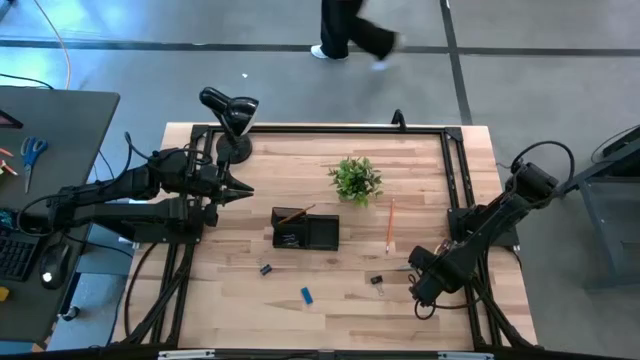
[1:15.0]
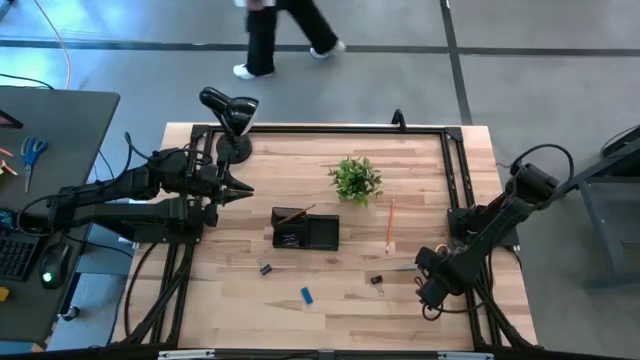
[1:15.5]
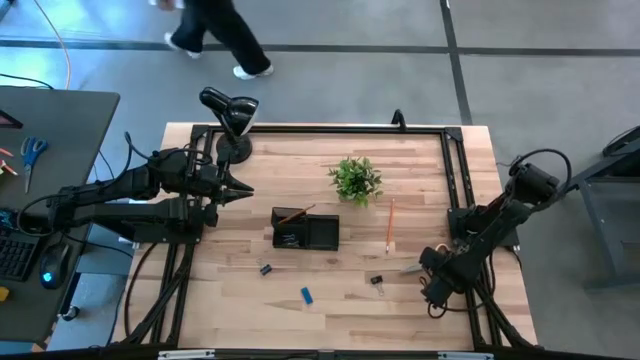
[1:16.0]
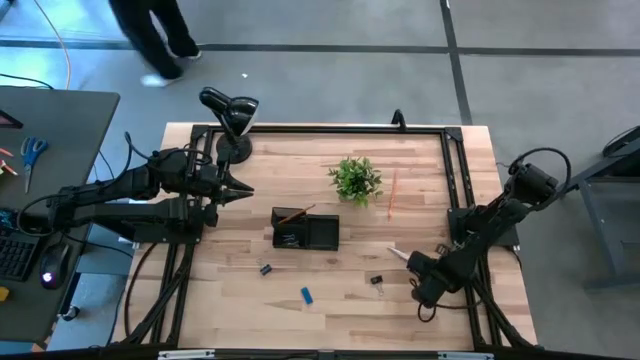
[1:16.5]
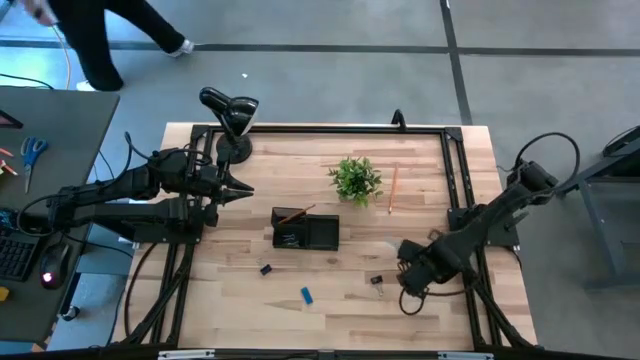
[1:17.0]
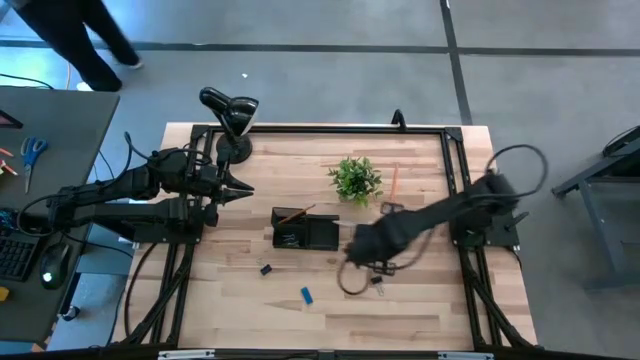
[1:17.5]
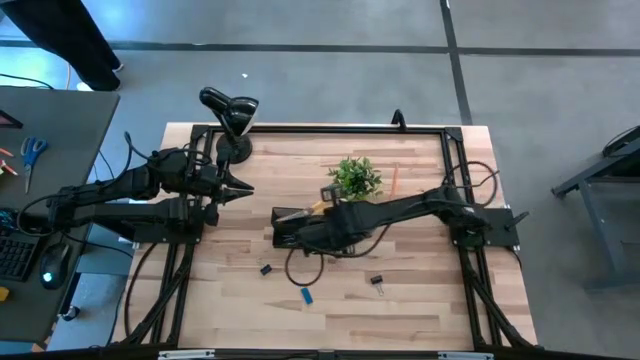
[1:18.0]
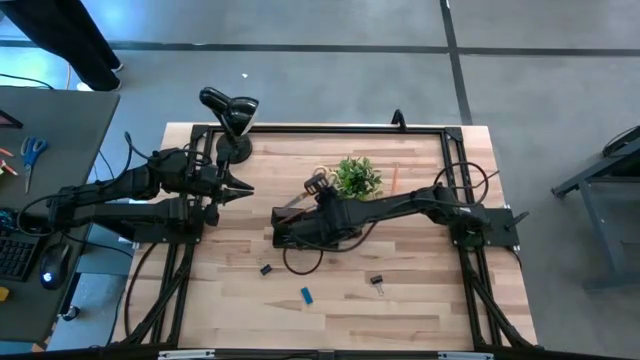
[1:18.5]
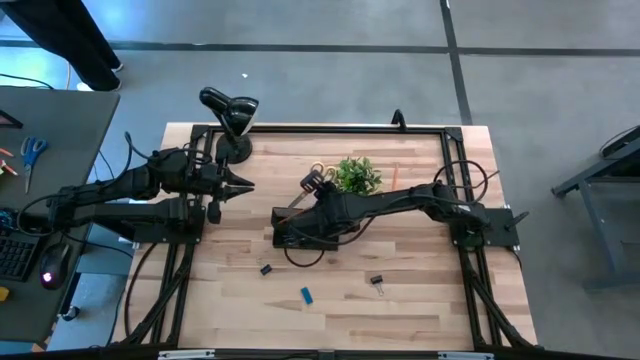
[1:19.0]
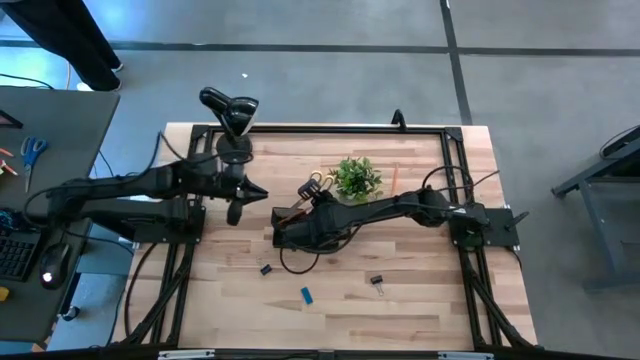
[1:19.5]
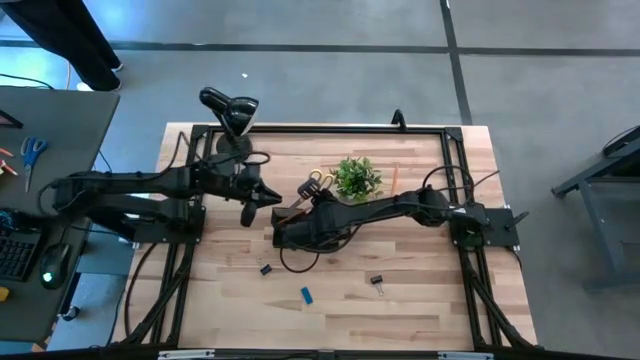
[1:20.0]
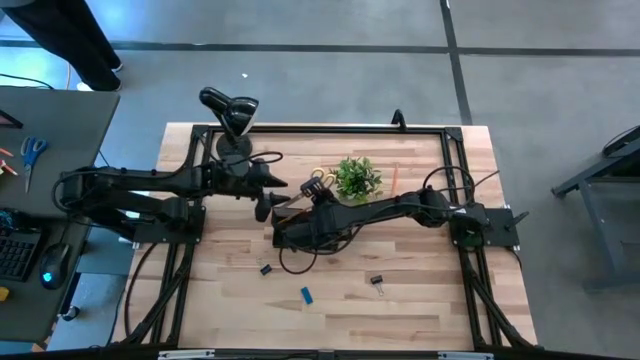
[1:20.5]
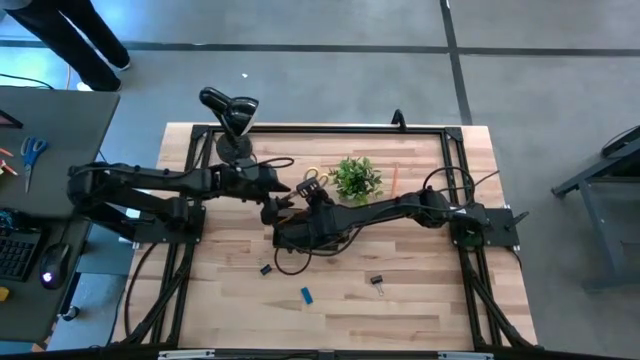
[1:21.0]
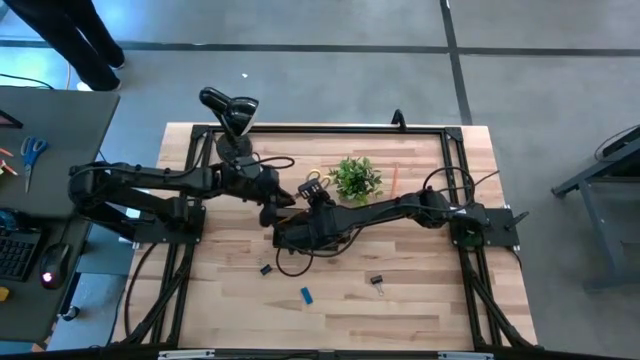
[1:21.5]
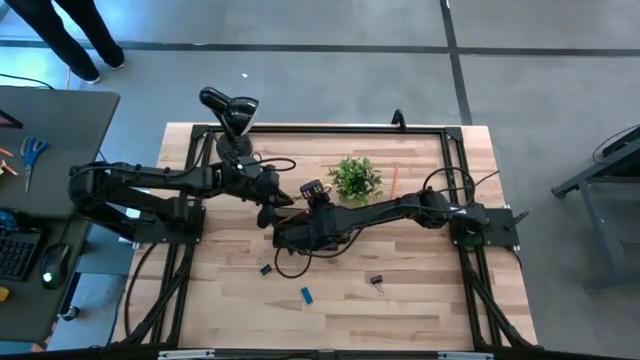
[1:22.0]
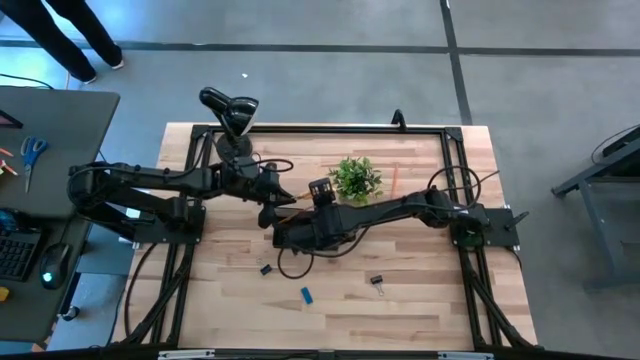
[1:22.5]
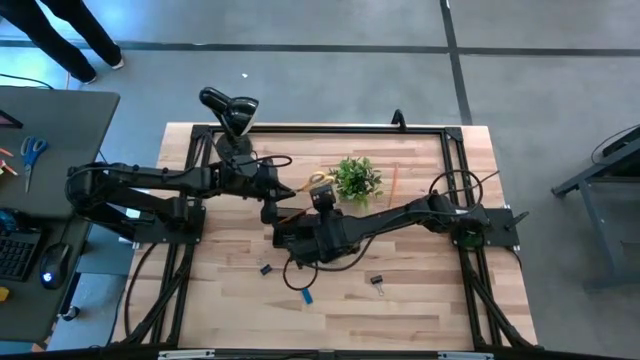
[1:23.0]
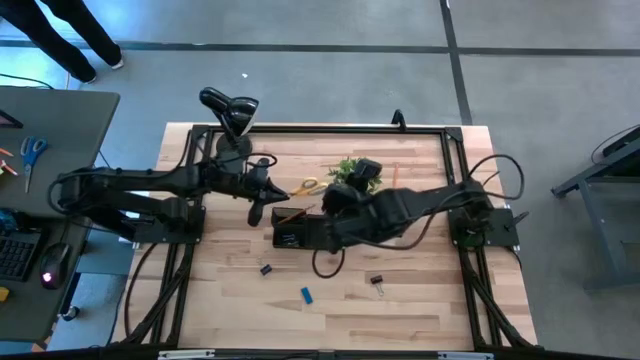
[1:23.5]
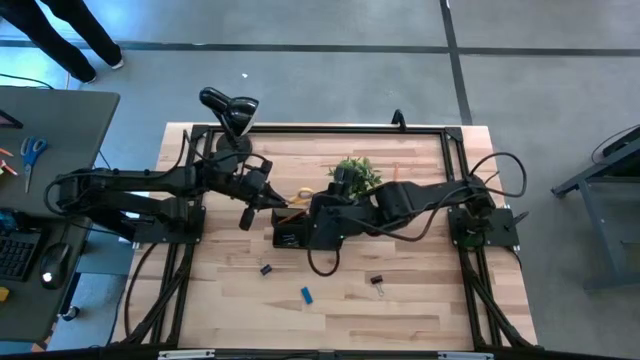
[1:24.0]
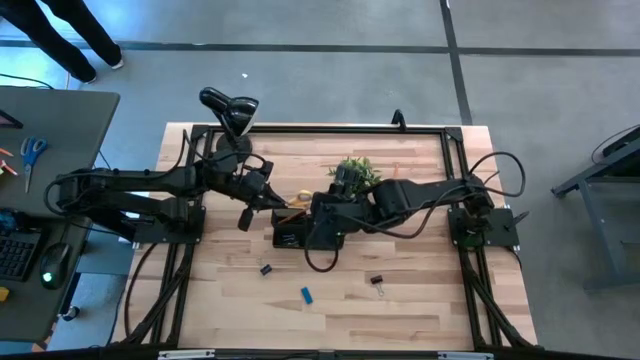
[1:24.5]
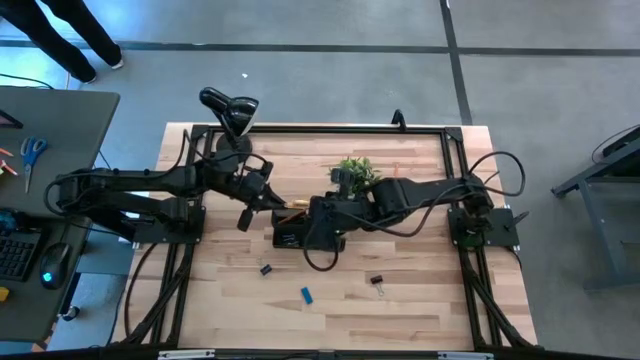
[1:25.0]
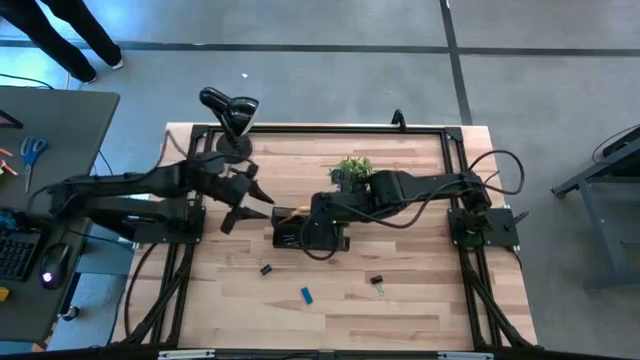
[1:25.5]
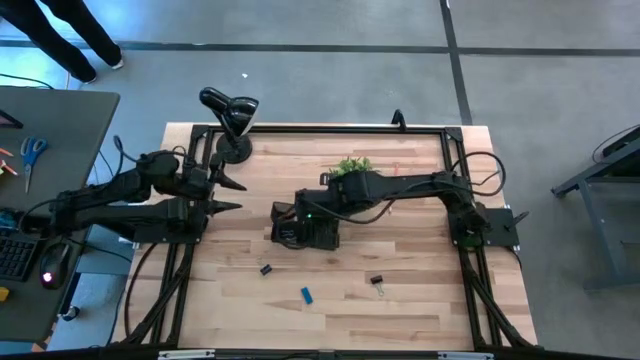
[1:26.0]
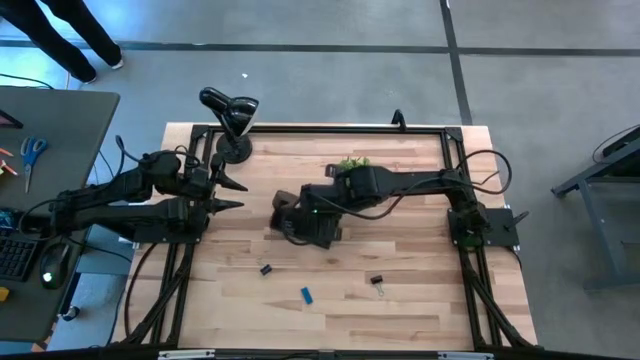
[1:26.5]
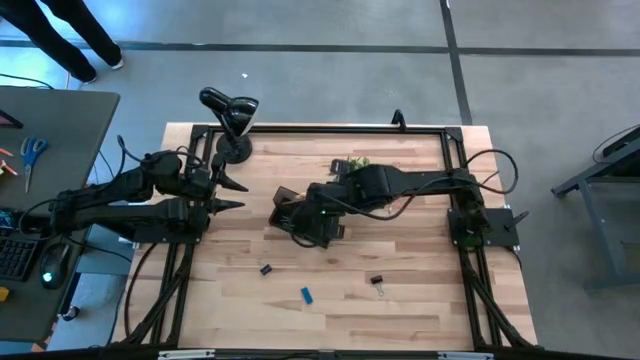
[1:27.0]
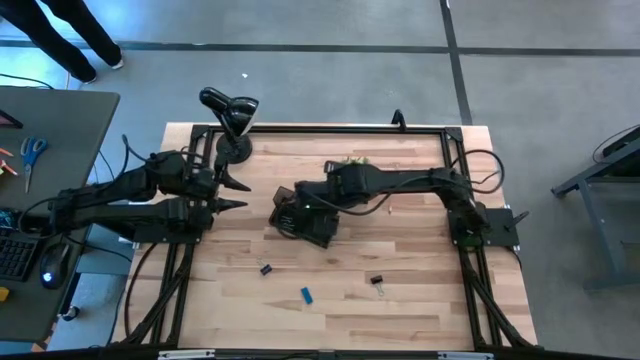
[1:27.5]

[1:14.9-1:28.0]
Task: Pick and place office supplies into organizer
Put the yellow scissors into the black desk organizer

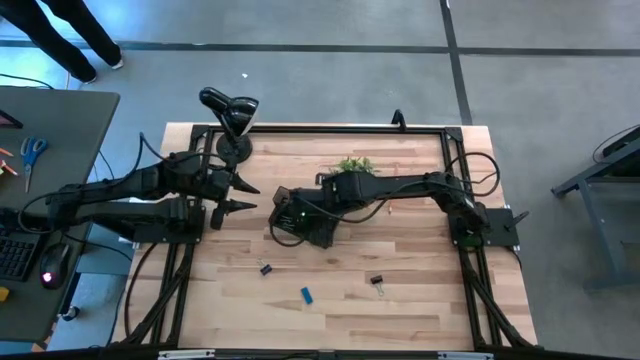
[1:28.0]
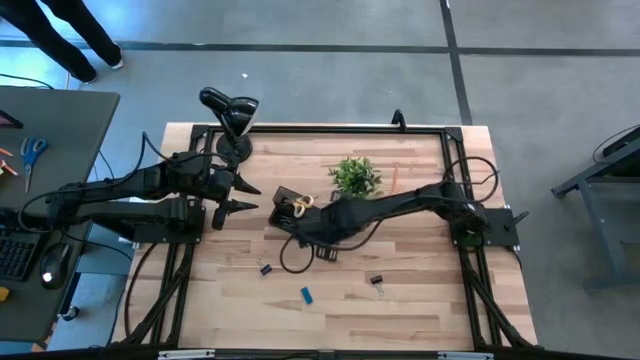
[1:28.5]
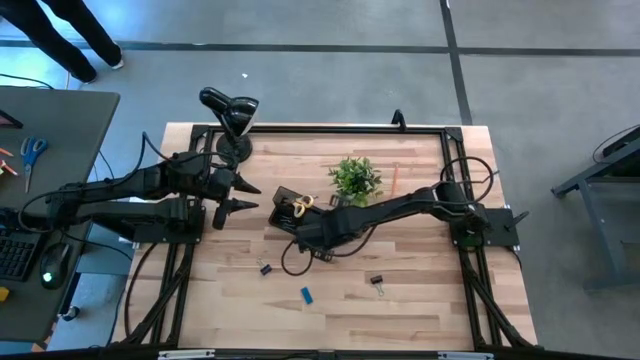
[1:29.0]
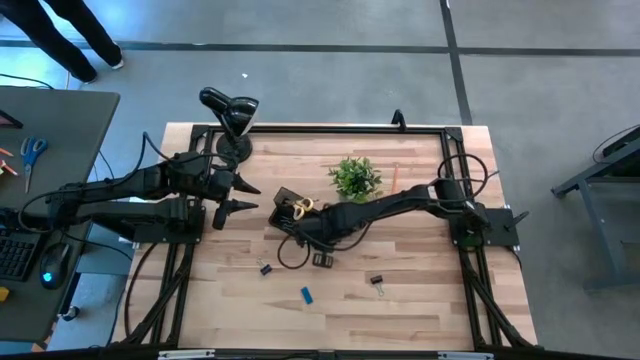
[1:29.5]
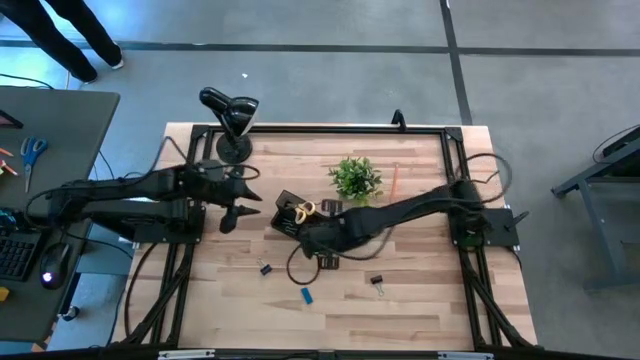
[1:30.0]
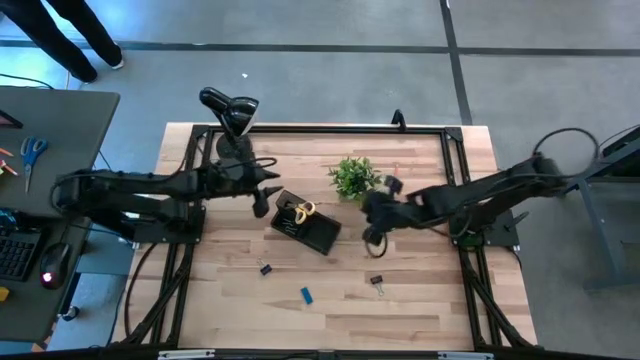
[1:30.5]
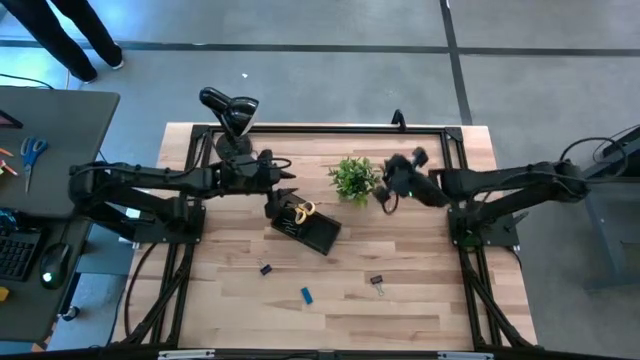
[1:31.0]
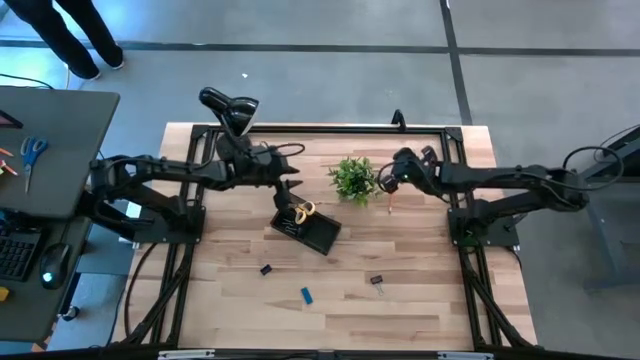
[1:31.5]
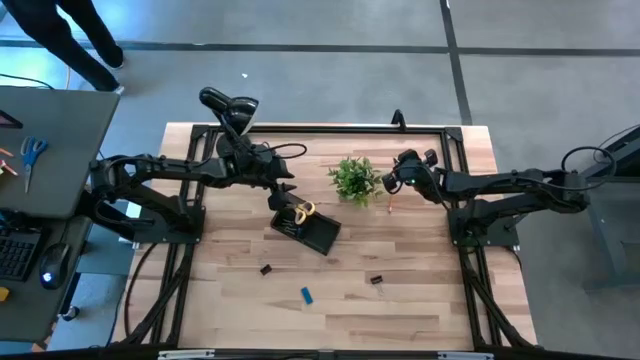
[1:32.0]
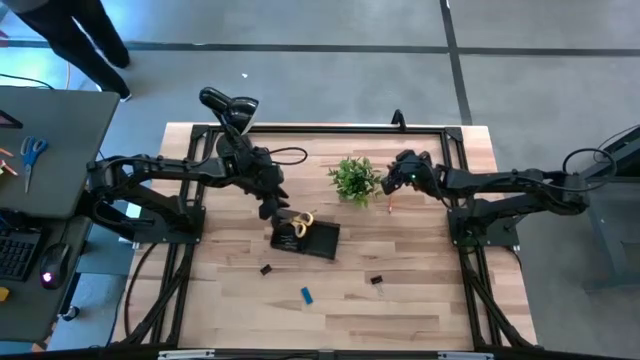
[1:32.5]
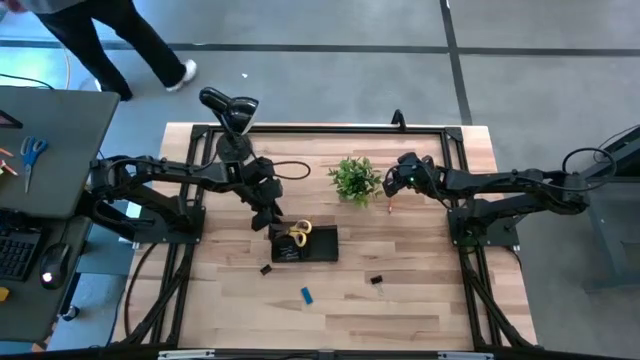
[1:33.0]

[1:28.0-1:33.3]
Adjust the black desk organizer

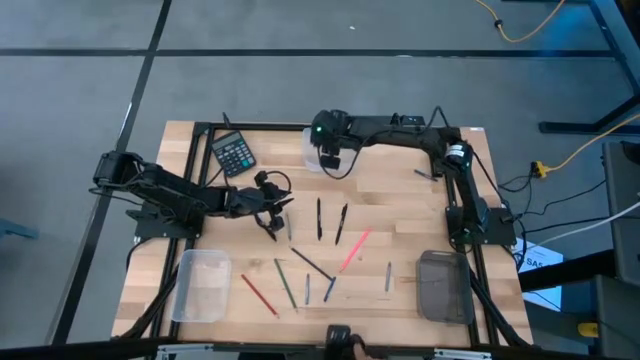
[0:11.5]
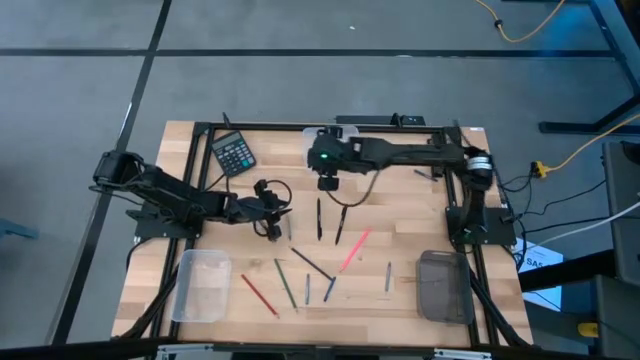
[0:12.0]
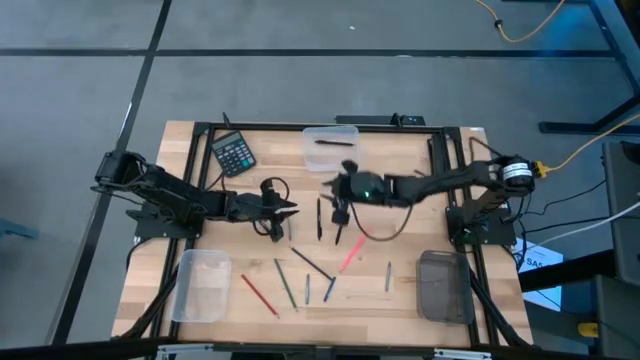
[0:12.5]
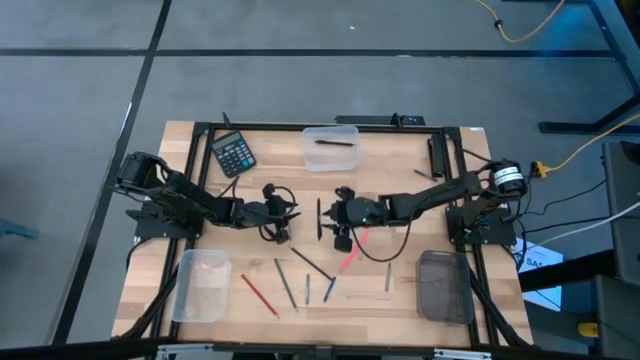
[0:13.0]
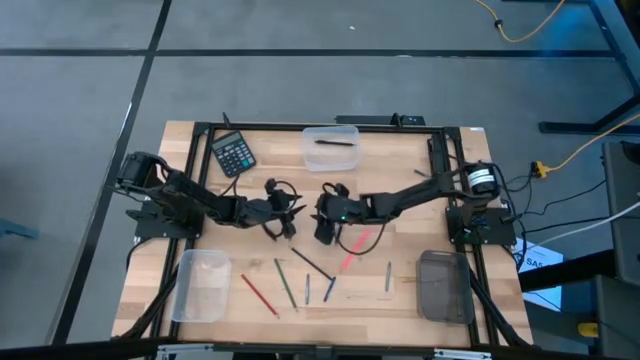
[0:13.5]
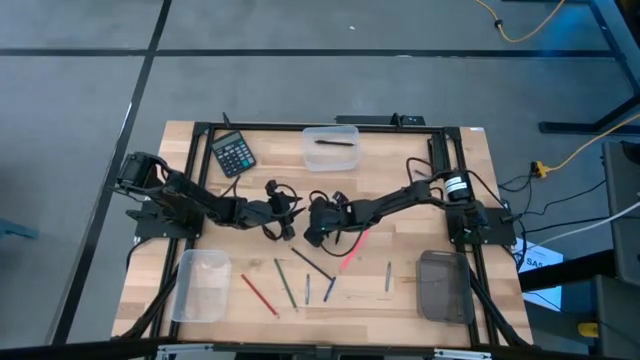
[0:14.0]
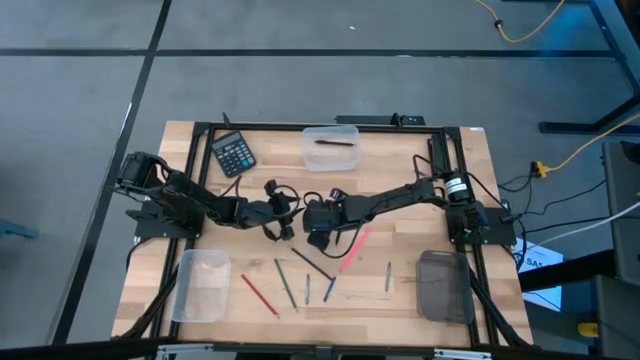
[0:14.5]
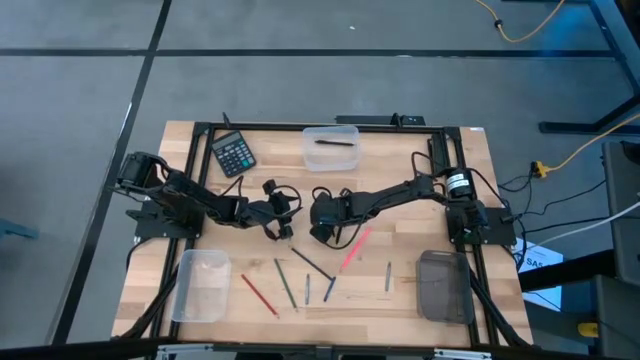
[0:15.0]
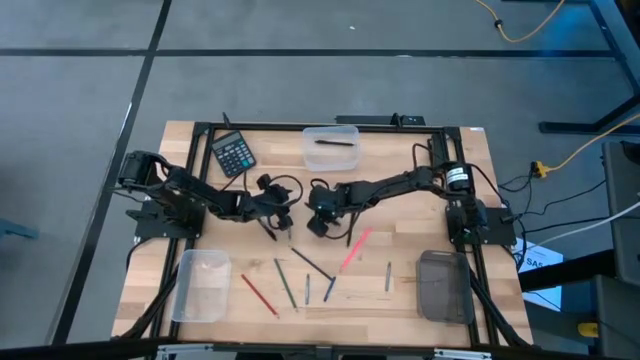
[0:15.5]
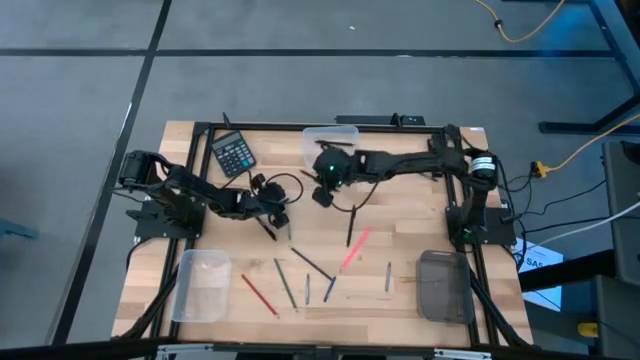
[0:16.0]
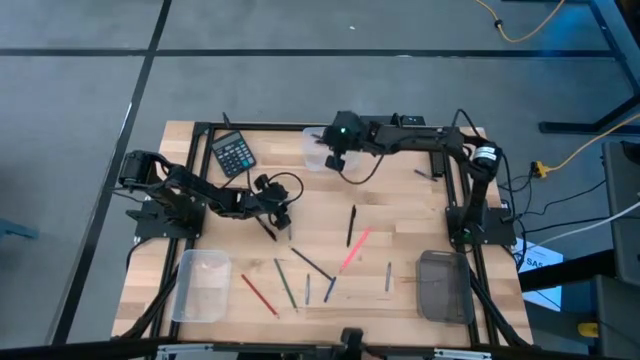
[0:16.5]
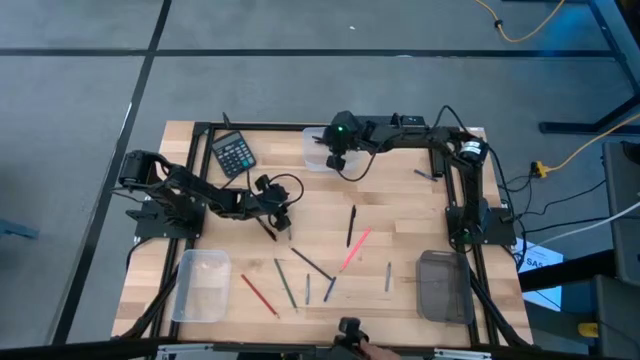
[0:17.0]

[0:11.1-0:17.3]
Task: Sort crayons/erasers/pens/pencils in bins
Put the middle black pen into the top transparent bin
